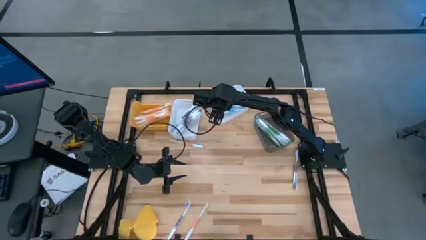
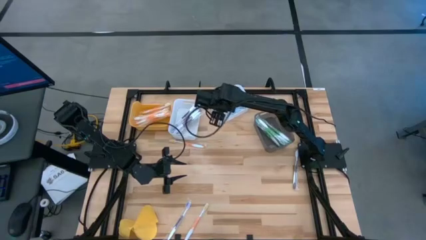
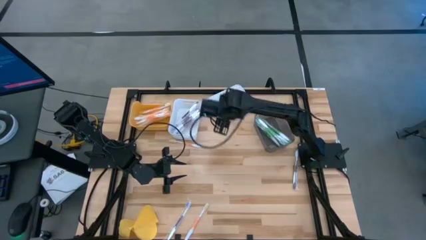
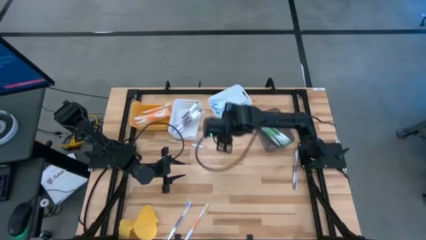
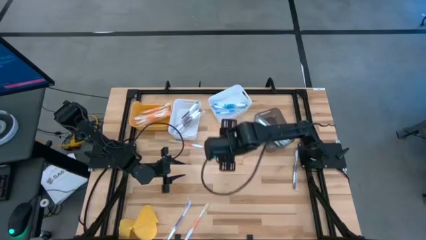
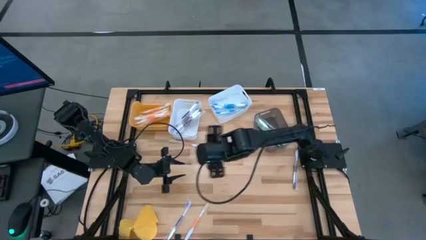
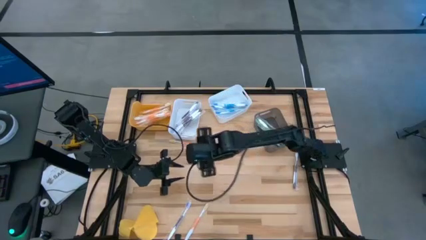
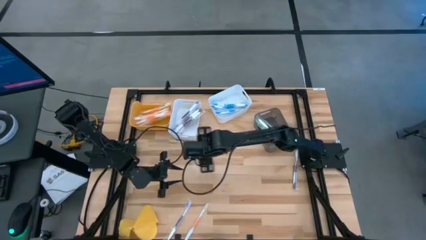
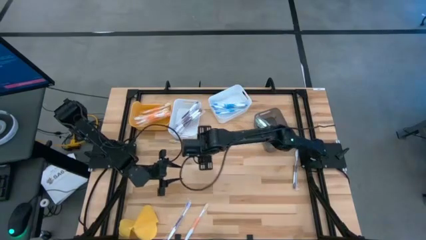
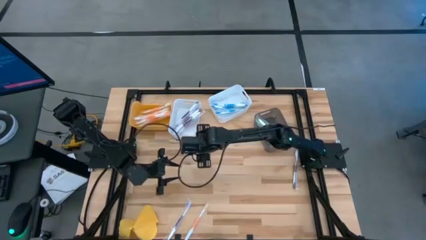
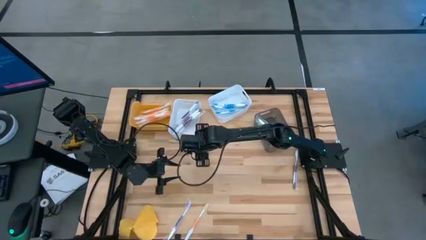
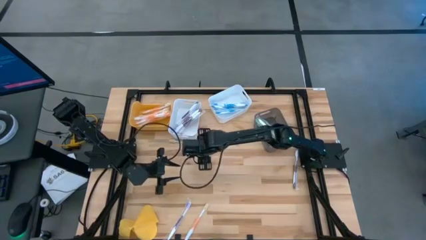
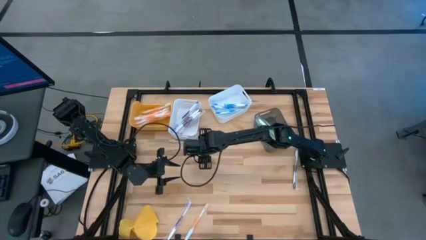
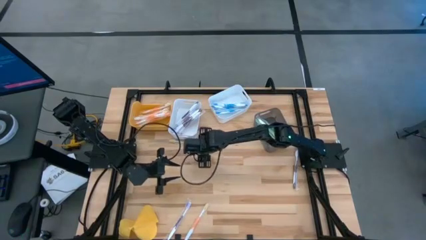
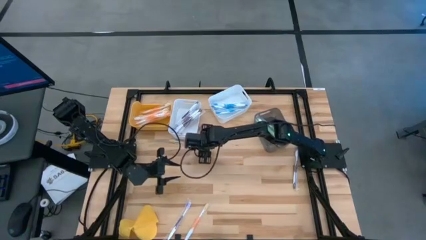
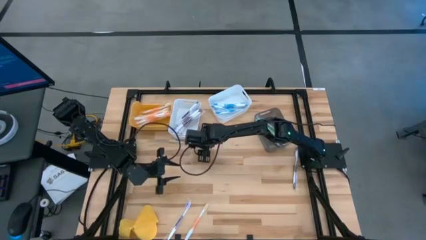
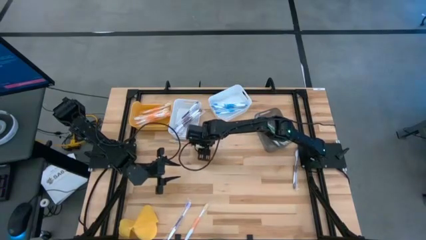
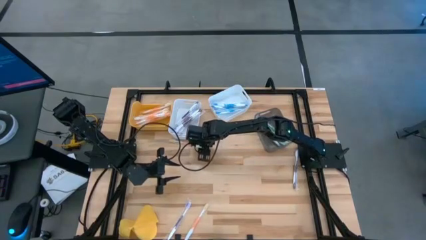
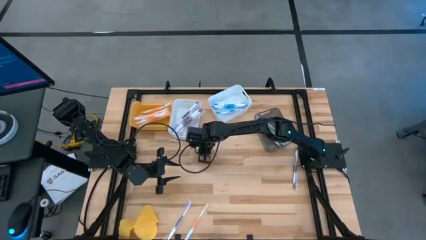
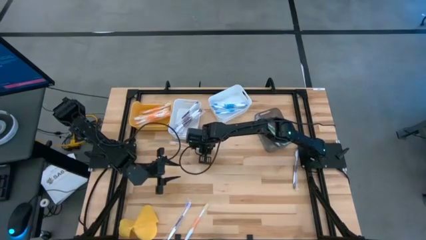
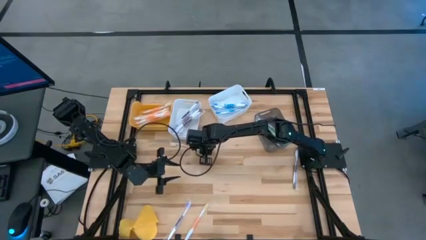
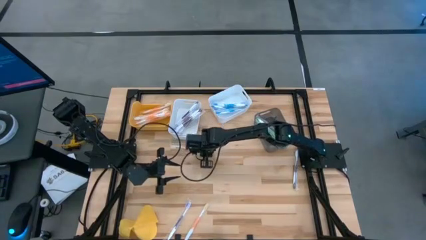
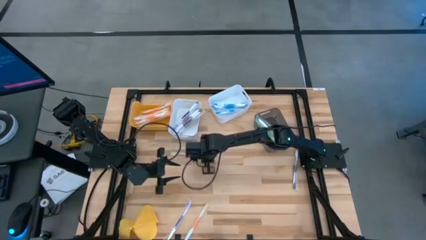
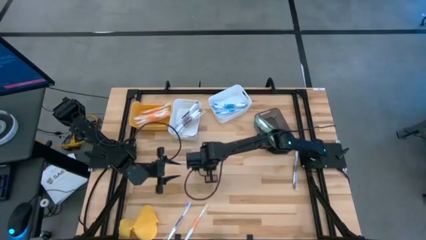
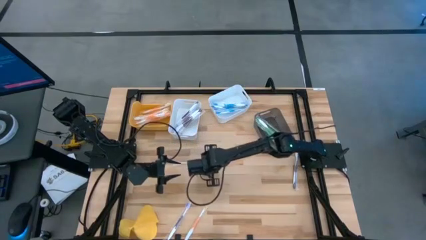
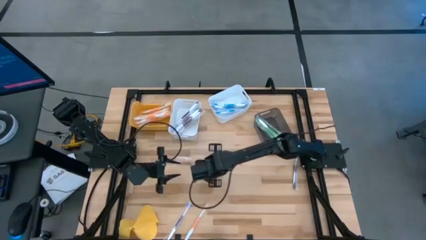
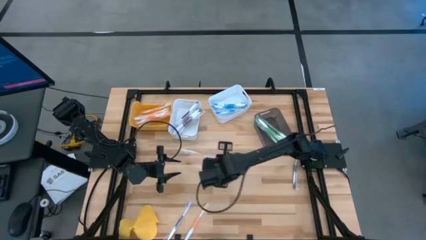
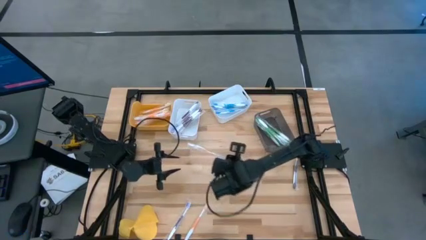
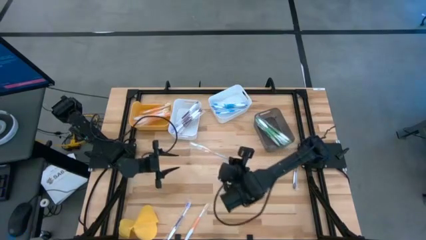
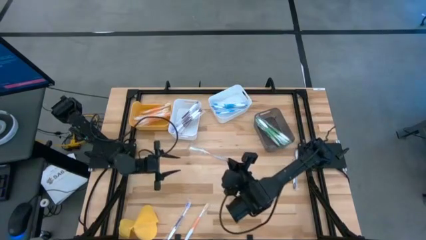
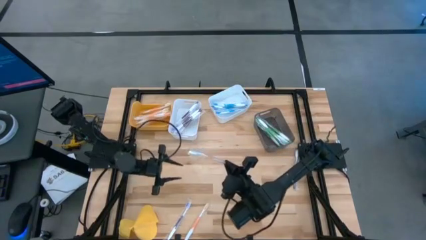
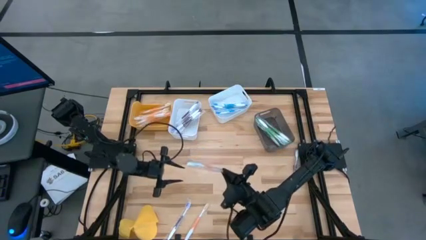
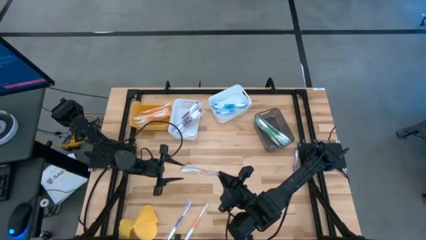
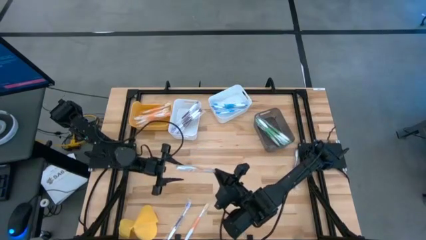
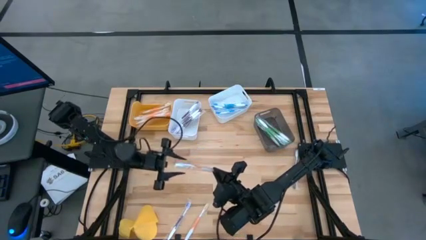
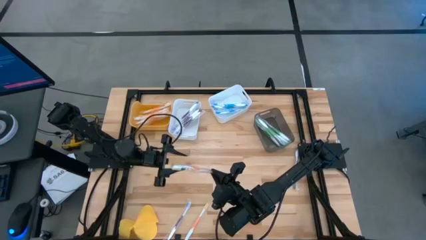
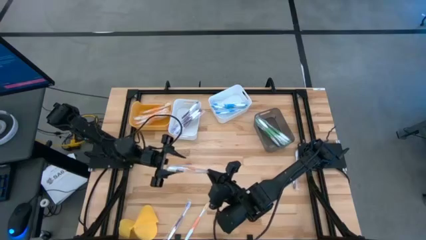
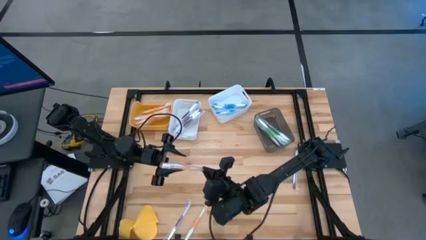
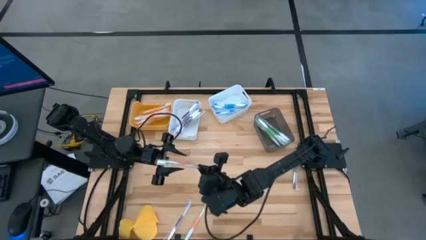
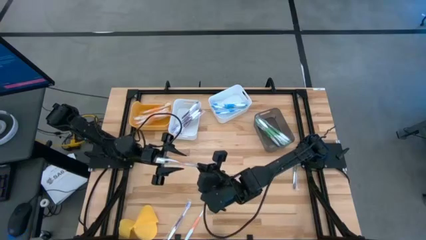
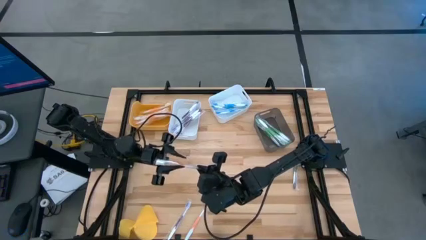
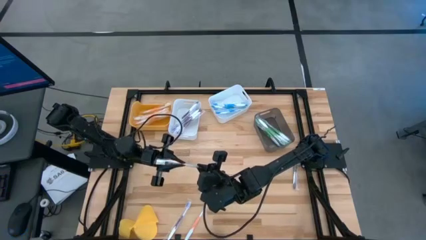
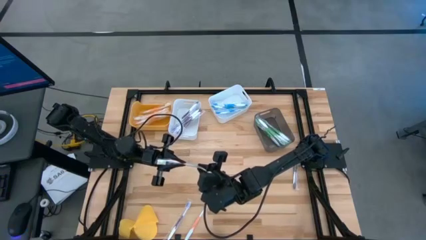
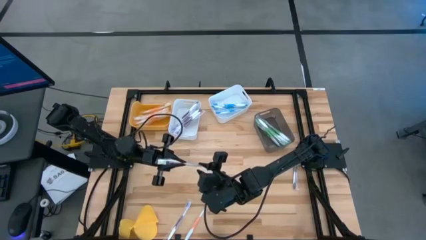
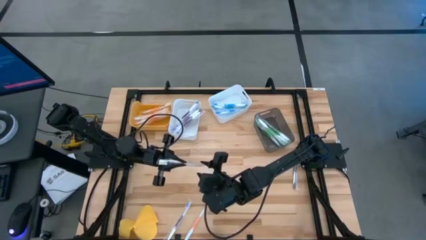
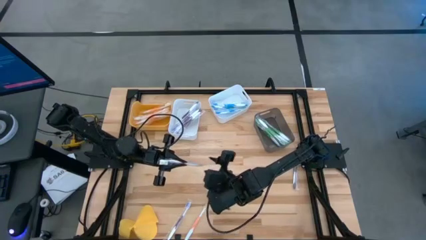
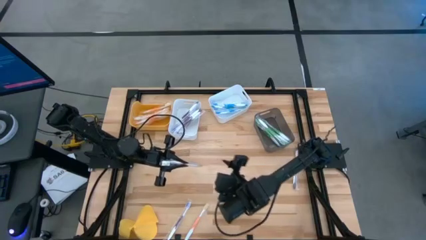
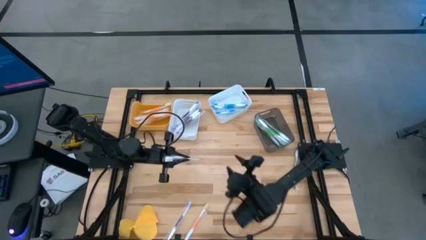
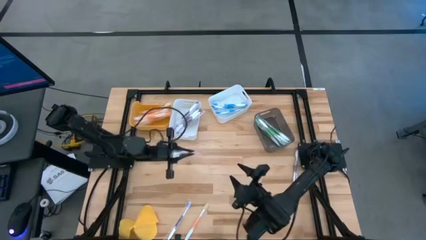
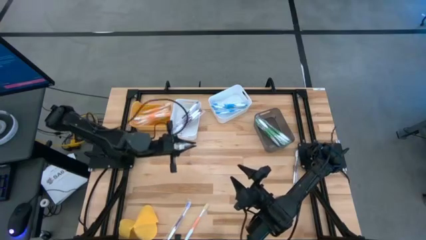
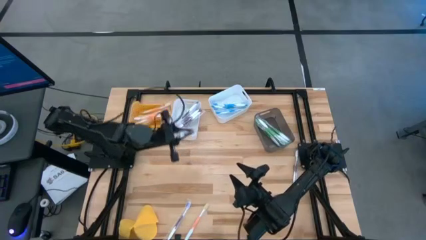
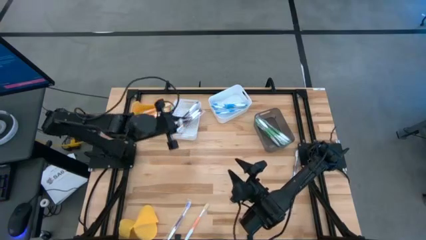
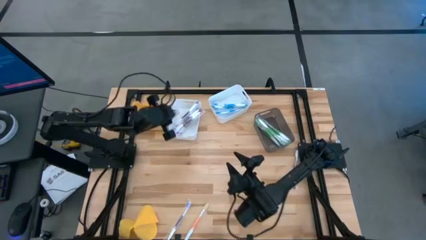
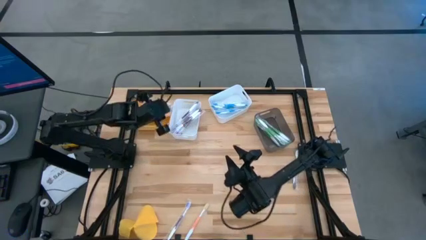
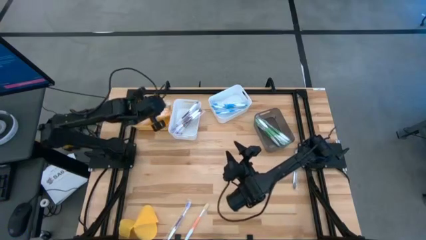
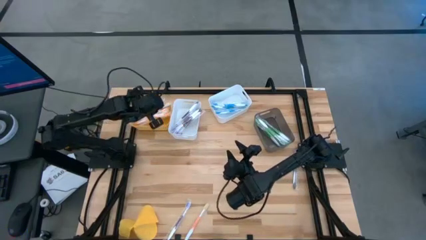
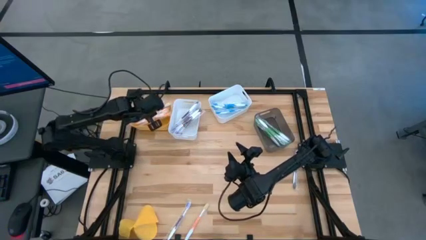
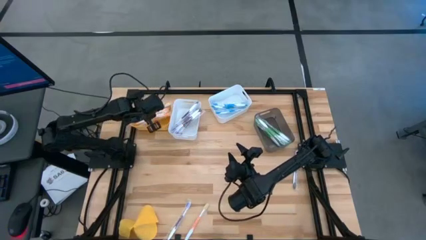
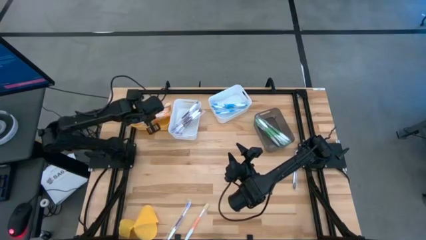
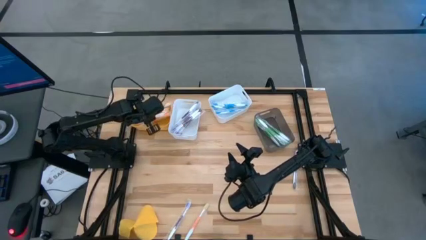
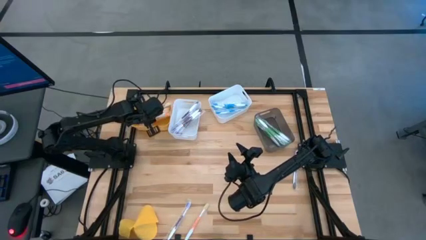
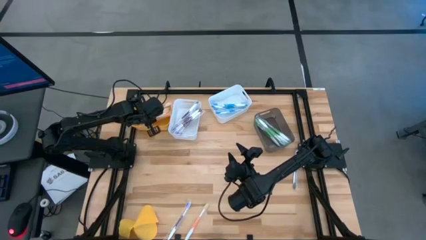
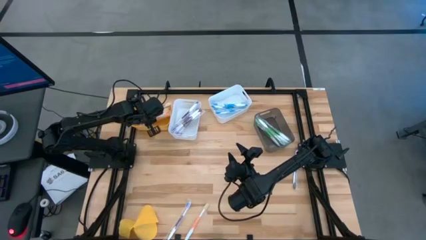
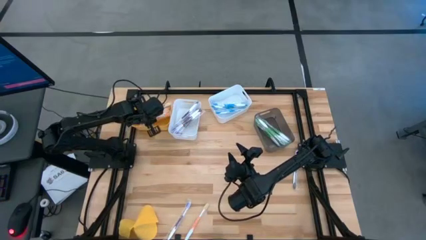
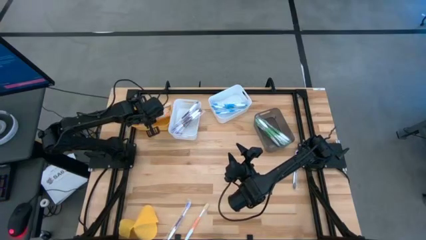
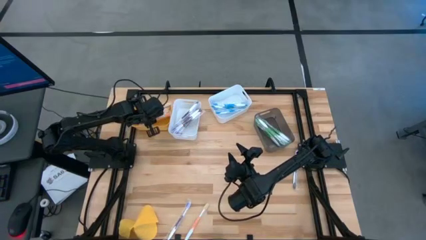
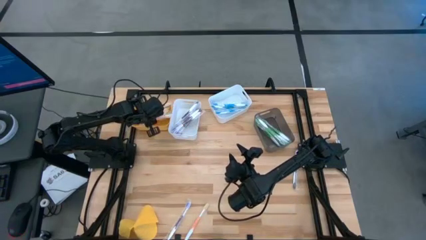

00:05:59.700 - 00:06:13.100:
Task: Pick & Place Toothbrushes
Put the orange toothbrush into the yellow bin
